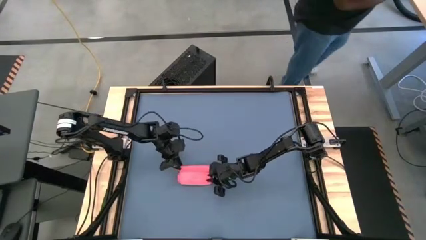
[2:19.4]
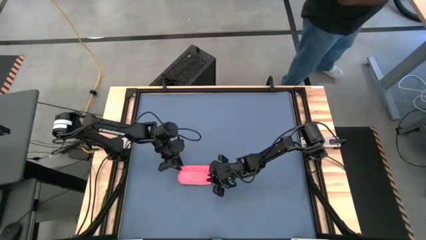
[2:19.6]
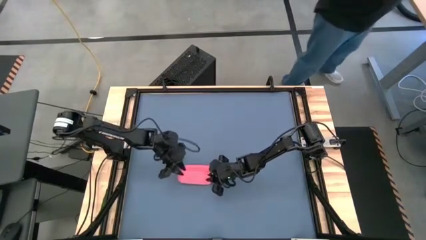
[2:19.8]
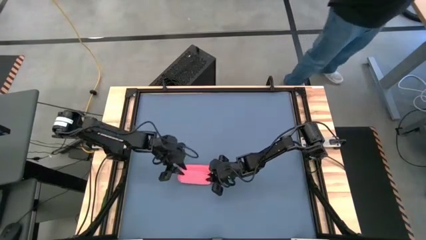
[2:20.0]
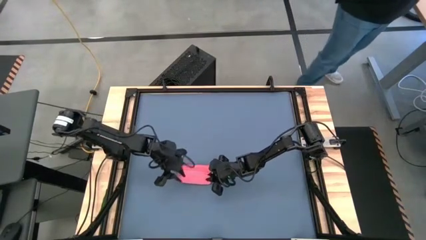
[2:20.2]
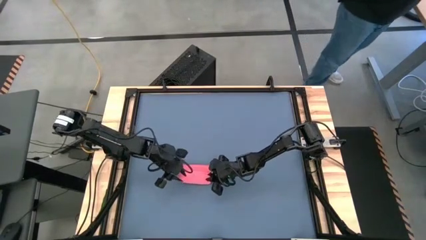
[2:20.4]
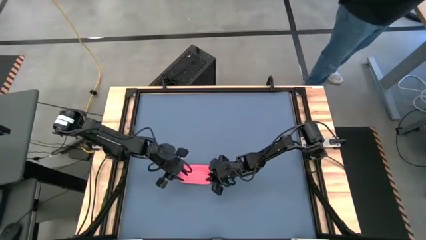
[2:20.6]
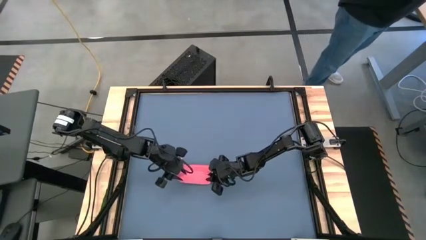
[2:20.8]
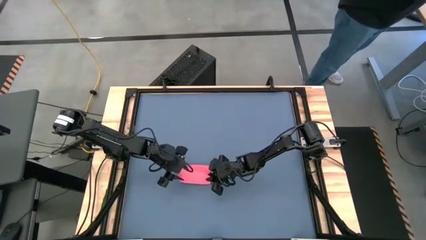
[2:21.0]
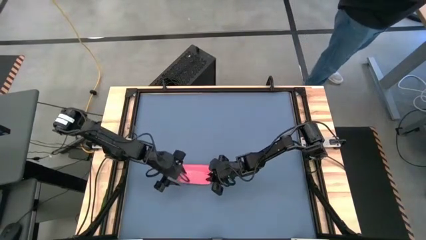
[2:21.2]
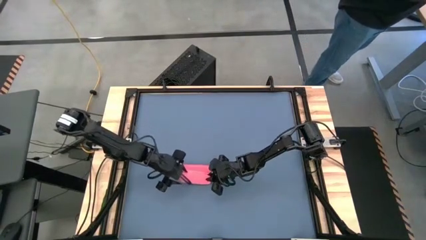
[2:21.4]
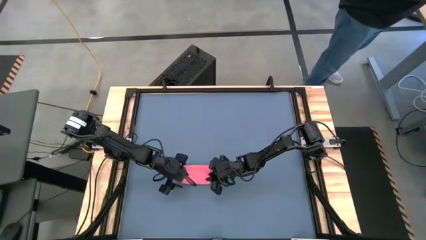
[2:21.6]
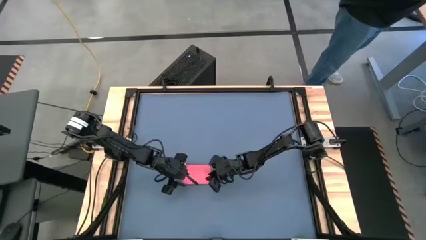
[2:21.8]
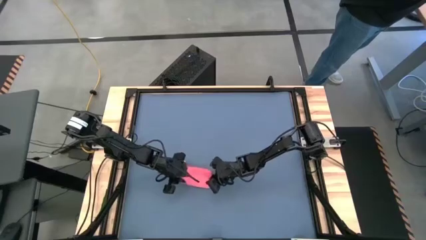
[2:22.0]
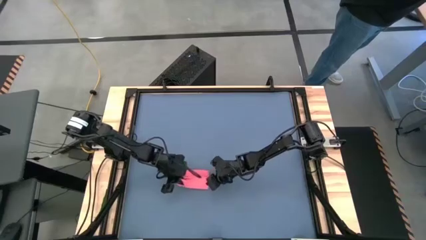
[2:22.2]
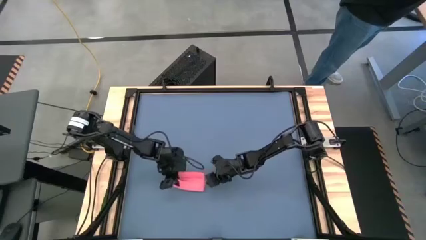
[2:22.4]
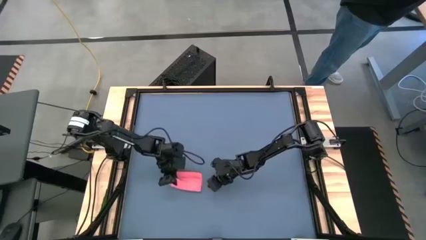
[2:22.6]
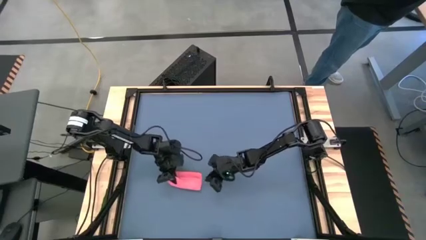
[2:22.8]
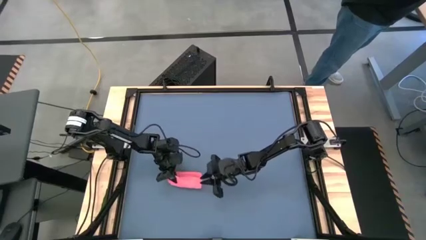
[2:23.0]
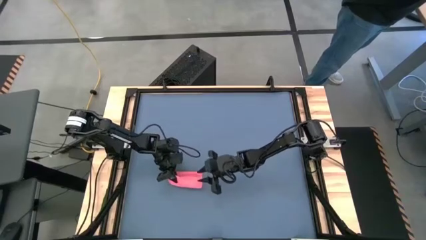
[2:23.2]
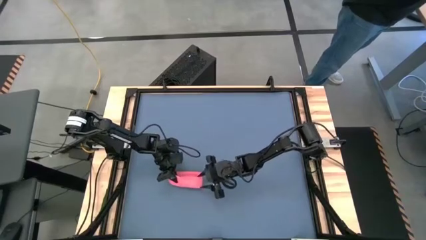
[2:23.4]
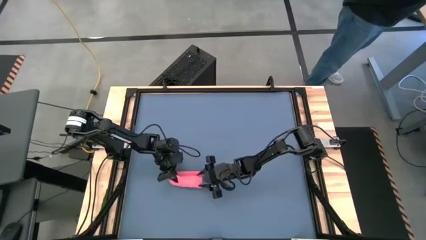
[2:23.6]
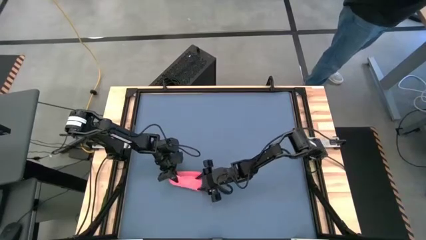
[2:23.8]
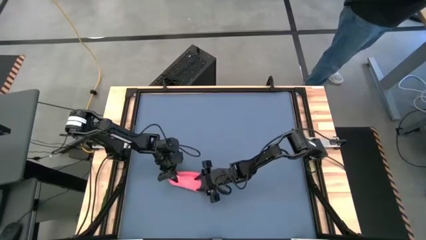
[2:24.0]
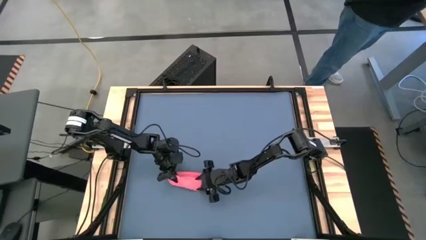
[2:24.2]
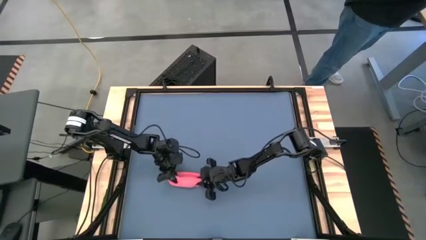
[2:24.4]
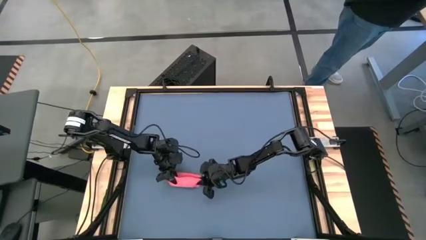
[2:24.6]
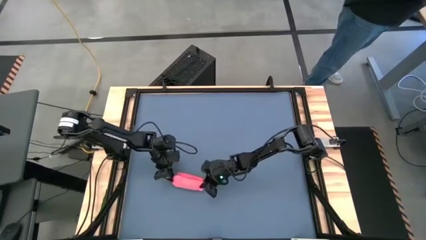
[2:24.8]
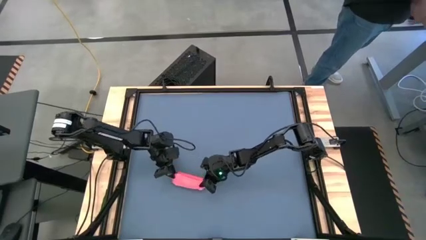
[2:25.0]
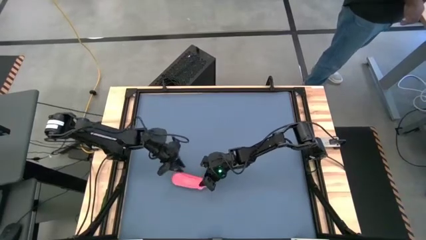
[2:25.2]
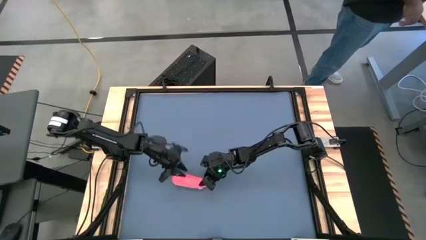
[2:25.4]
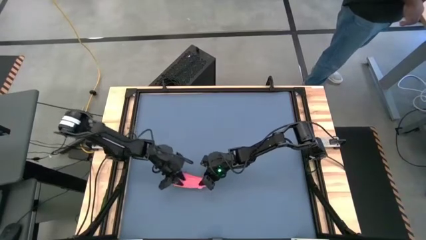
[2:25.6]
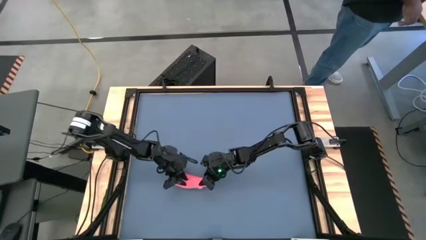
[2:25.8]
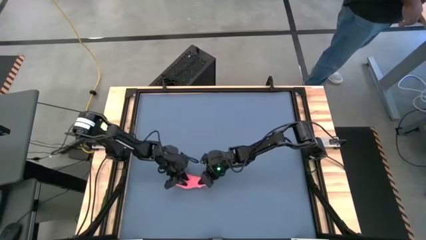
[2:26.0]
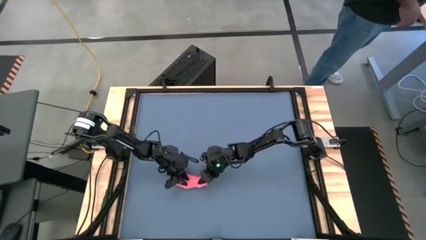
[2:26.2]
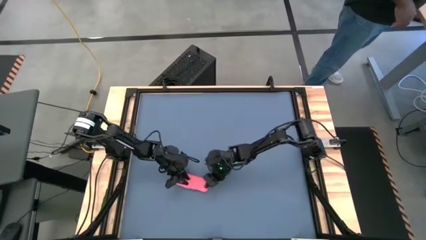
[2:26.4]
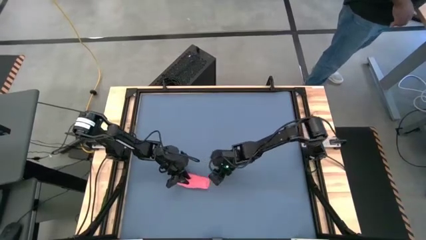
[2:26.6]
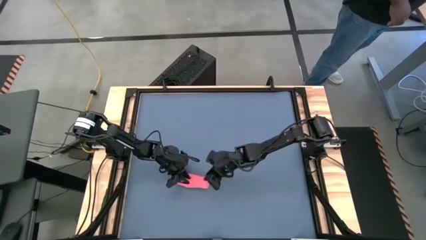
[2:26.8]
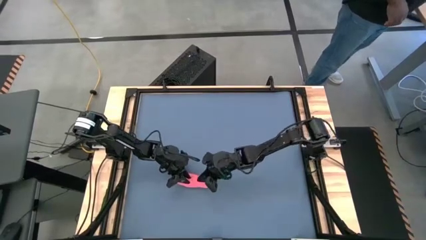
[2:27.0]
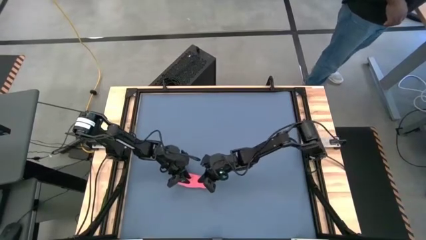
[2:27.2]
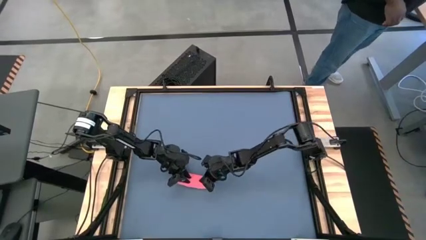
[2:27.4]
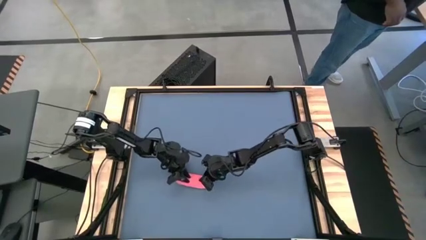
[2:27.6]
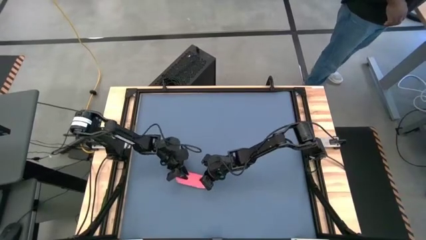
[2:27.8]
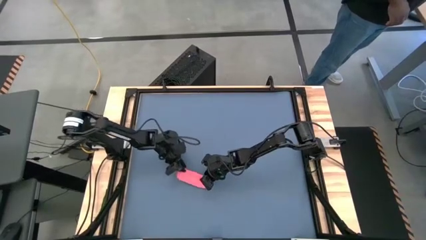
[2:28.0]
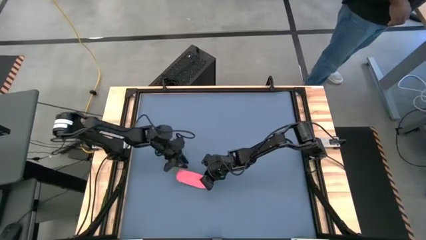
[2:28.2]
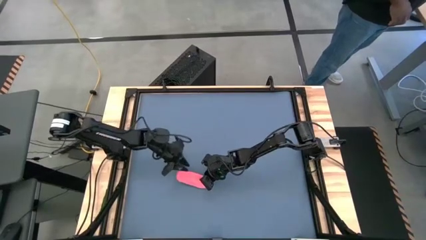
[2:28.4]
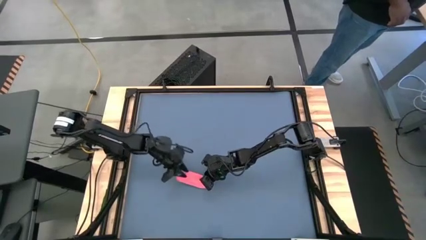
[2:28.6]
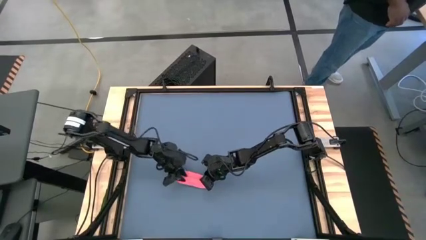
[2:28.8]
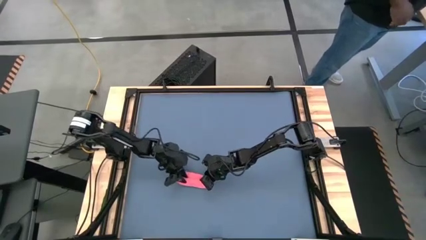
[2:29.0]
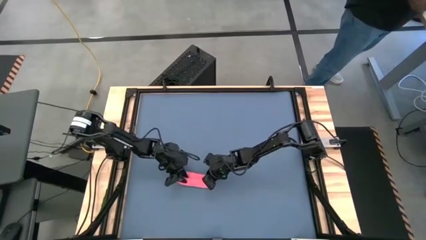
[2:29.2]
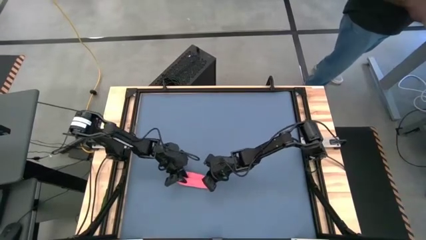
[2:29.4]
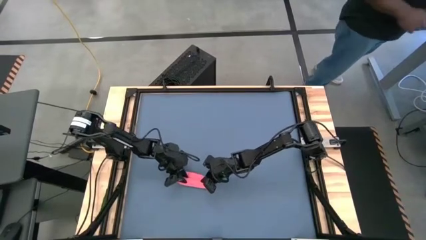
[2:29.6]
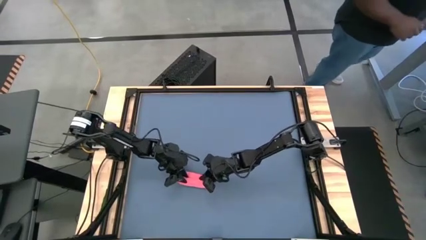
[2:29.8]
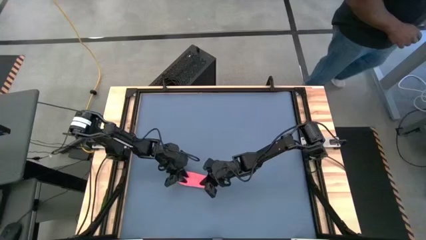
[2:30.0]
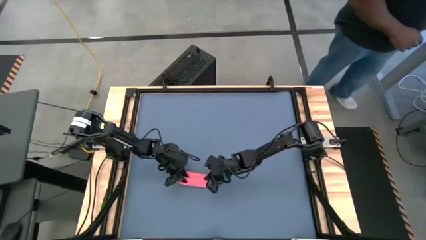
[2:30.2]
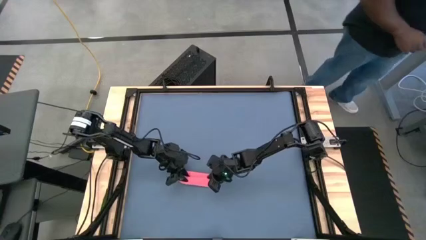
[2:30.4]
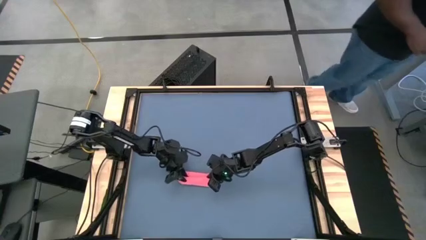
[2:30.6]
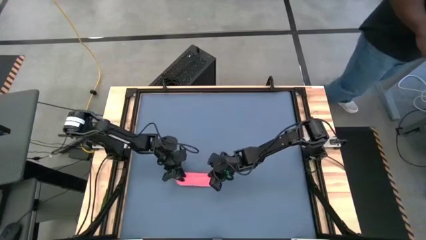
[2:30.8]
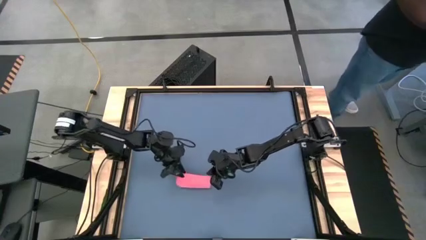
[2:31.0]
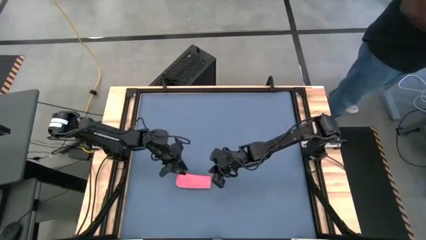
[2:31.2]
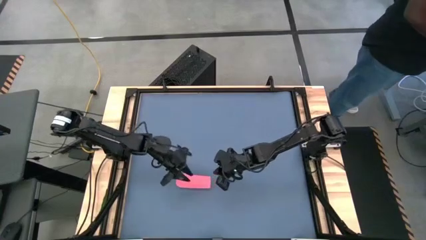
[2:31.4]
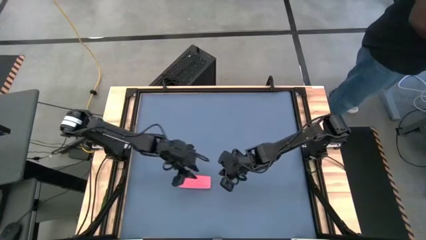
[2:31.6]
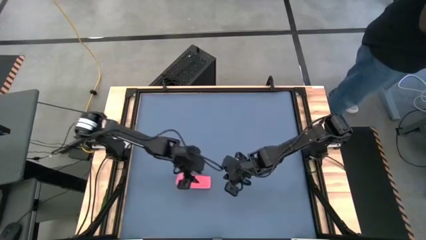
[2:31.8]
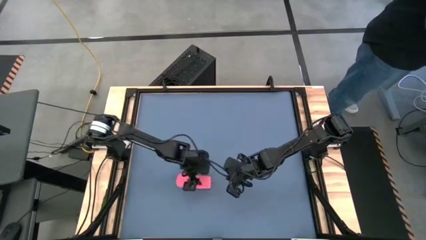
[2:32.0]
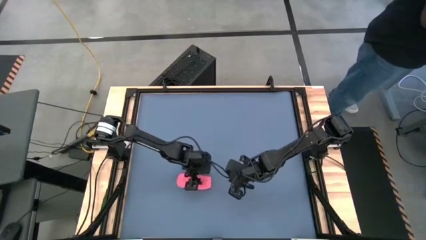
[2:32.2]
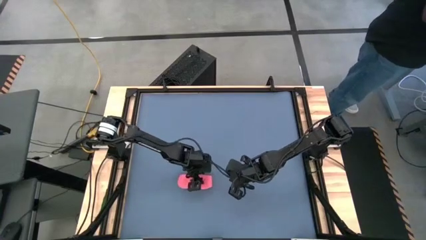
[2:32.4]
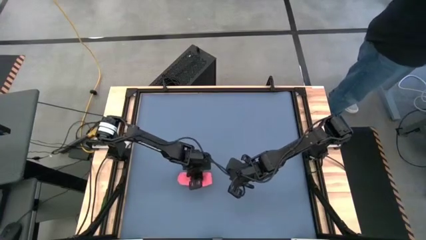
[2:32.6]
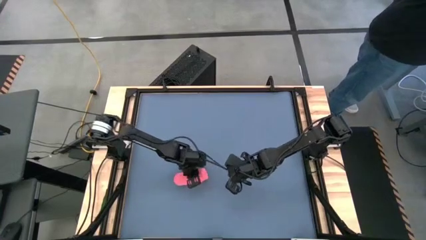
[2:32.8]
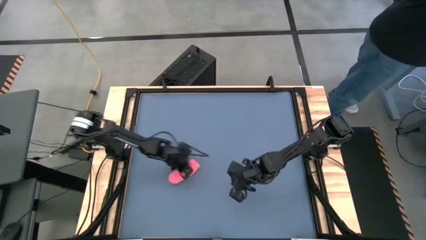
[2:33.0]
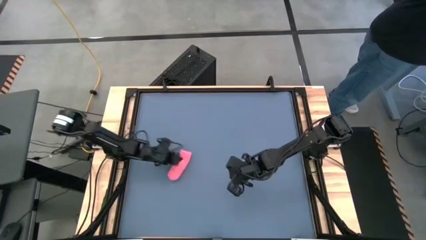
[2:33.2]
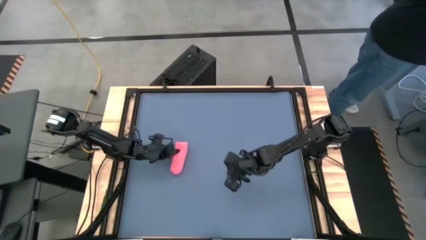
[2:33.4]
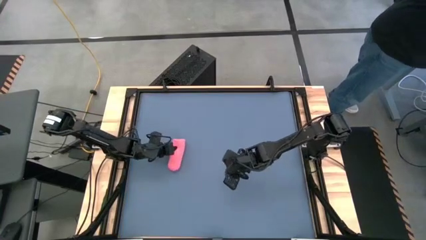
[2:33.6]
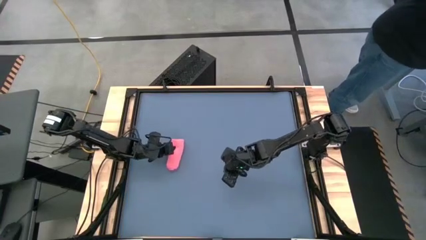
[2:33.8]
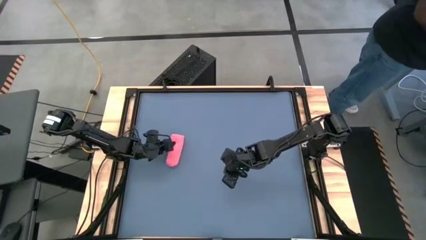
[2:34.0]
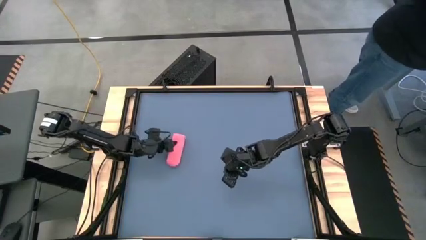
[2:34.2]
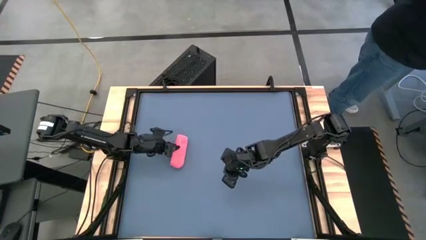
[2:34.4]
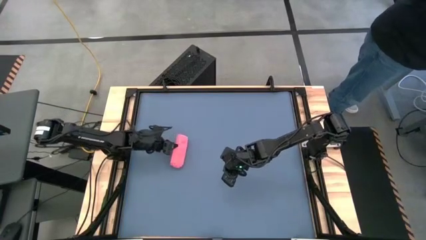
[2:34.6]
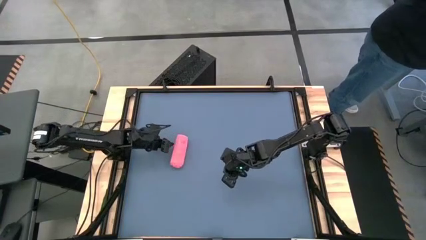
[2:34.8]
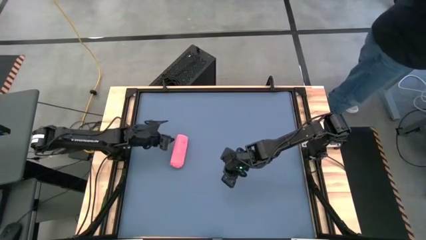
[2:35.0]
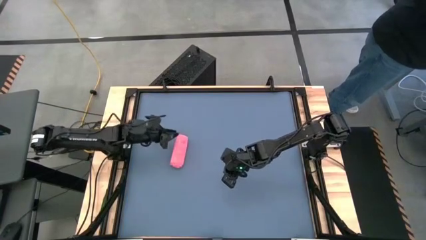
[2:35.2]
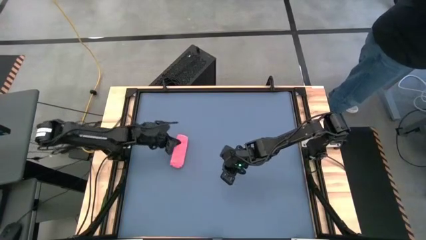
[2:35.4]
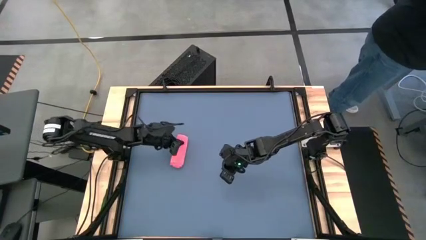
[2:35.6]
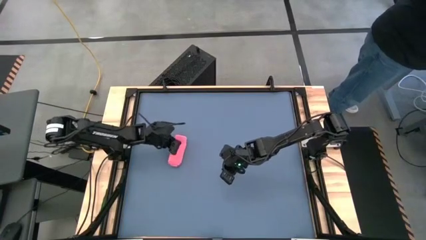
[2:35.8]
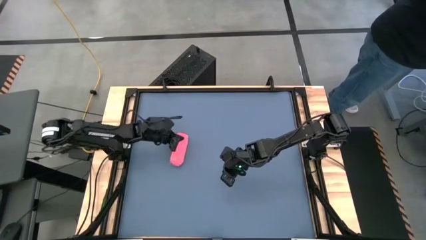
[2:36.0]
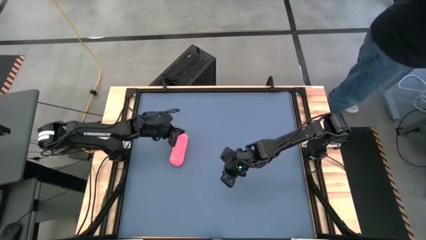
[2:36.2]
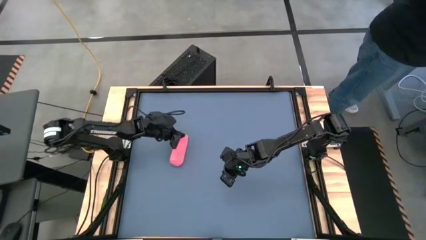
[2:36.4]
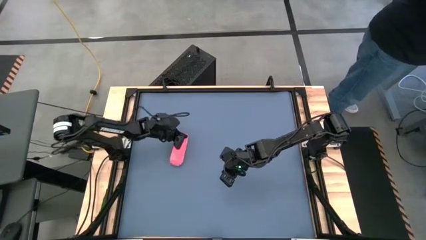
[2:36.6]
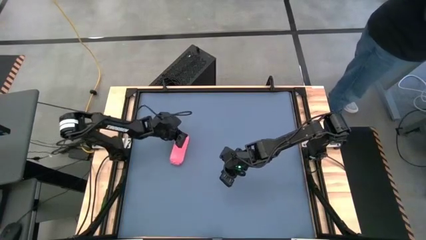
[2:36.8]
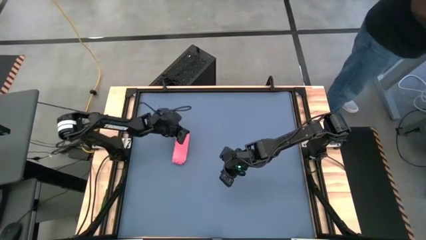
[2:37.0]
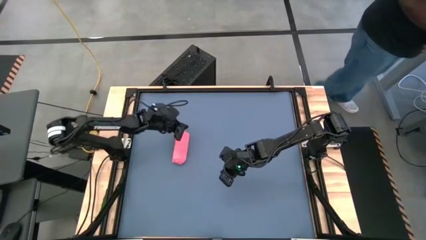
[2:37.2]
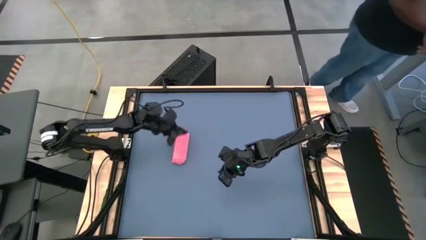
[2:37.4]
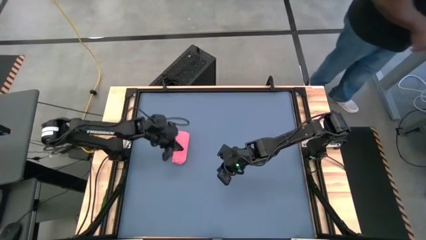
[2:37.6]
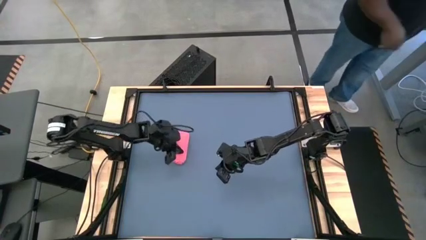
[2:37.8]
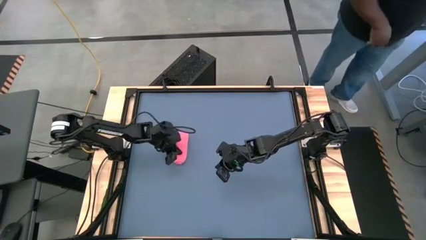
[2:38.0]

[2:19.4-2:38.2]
Task: Roll towel
Roll the pink towel
